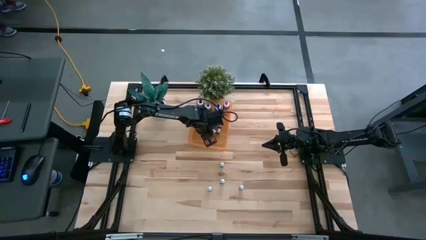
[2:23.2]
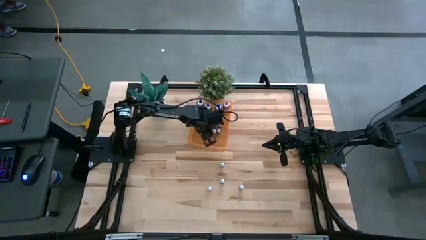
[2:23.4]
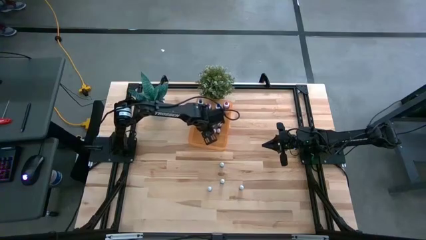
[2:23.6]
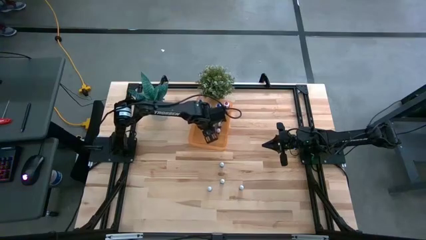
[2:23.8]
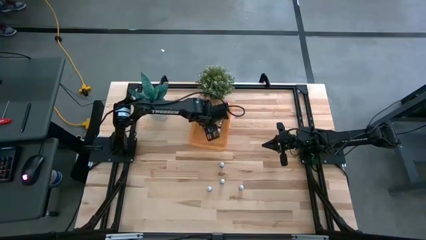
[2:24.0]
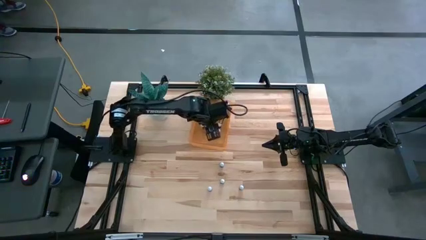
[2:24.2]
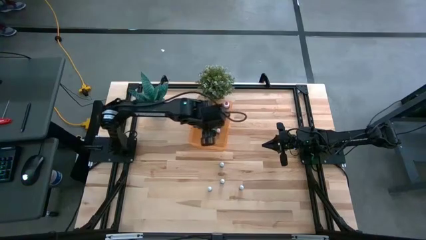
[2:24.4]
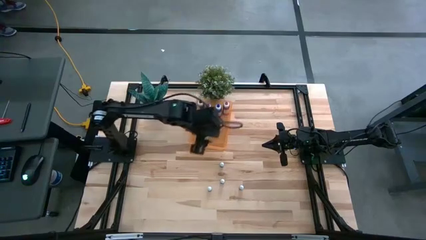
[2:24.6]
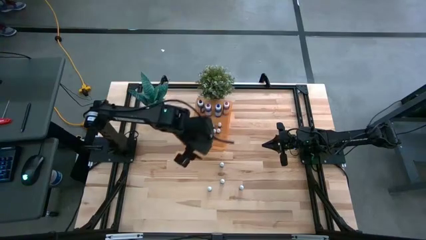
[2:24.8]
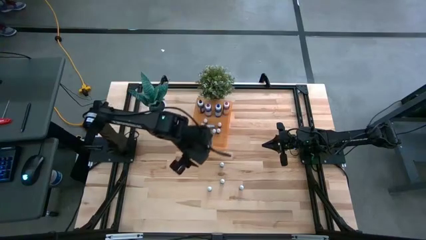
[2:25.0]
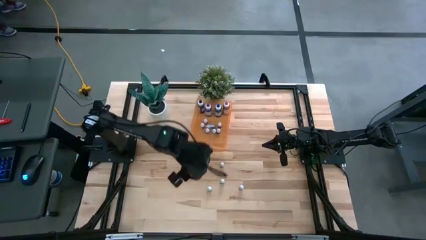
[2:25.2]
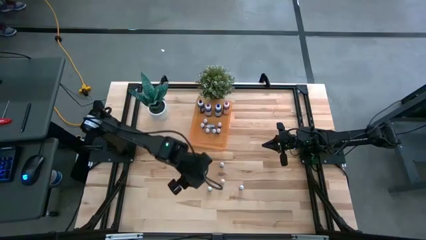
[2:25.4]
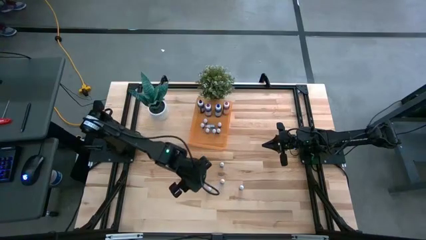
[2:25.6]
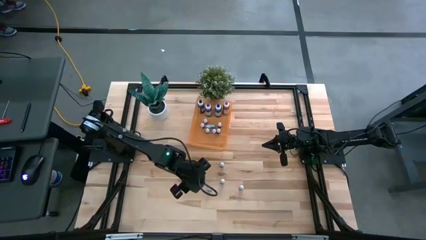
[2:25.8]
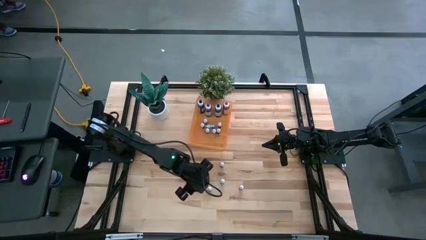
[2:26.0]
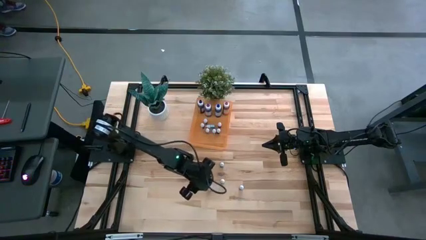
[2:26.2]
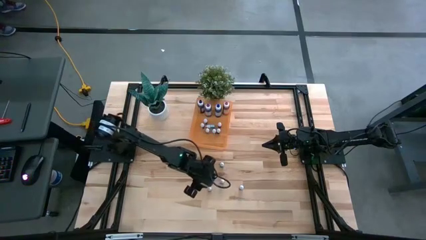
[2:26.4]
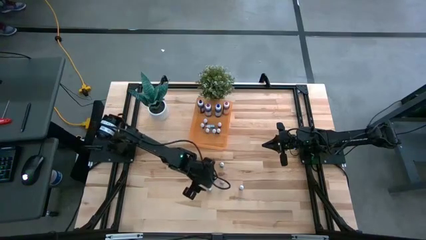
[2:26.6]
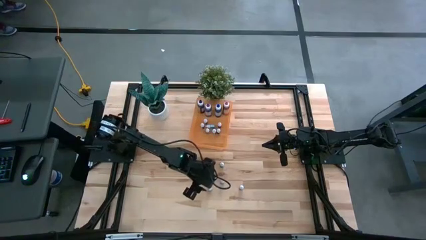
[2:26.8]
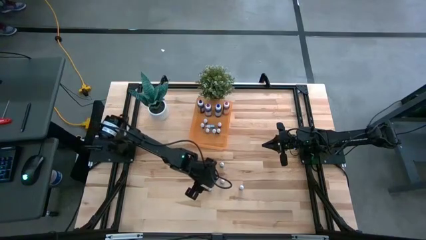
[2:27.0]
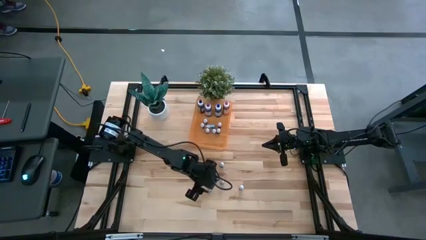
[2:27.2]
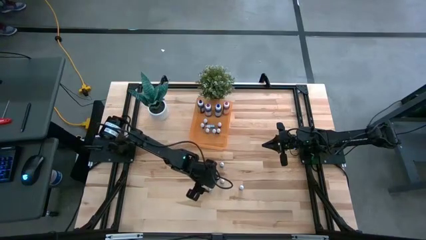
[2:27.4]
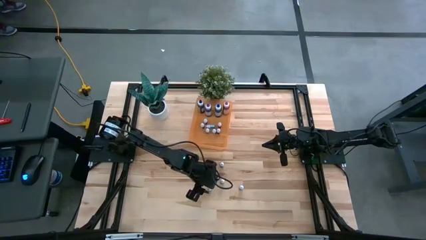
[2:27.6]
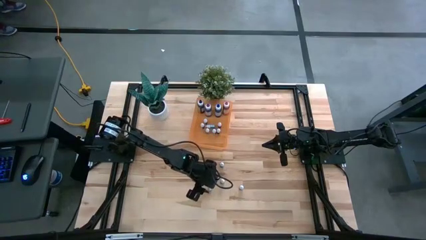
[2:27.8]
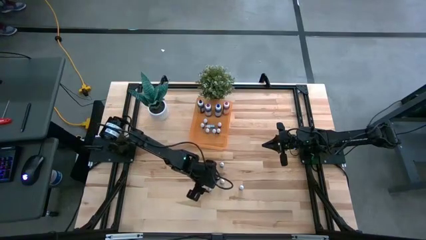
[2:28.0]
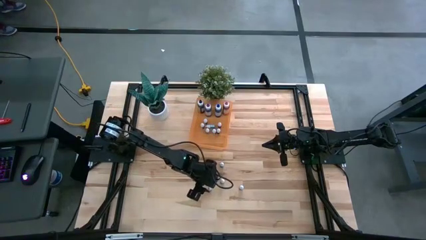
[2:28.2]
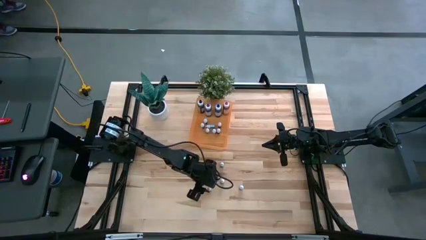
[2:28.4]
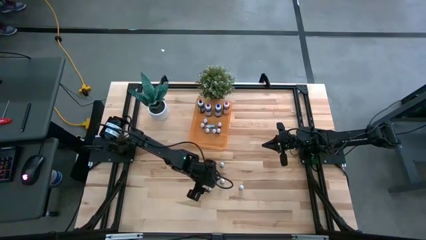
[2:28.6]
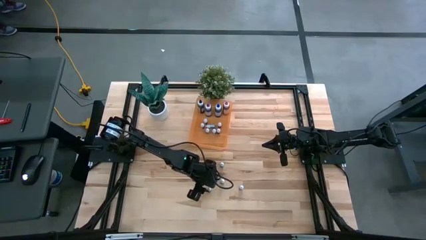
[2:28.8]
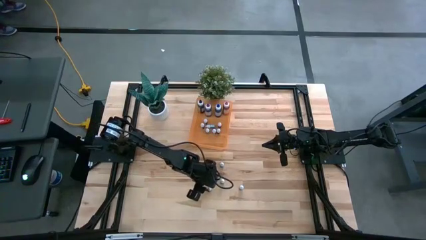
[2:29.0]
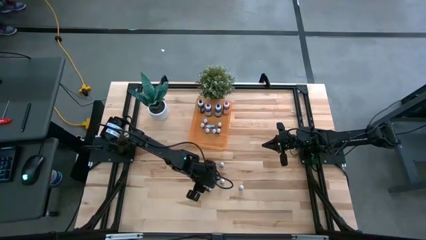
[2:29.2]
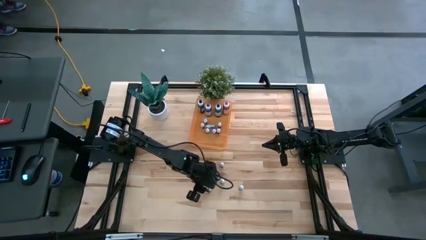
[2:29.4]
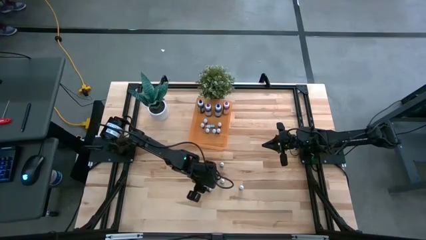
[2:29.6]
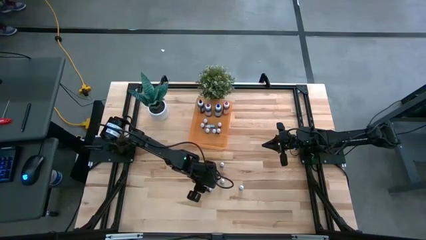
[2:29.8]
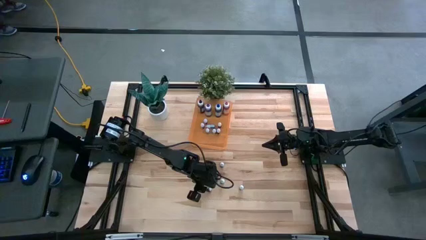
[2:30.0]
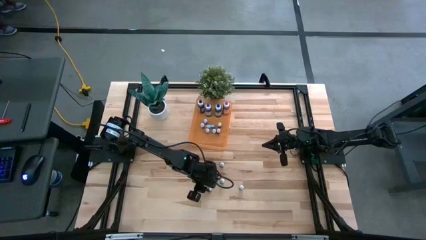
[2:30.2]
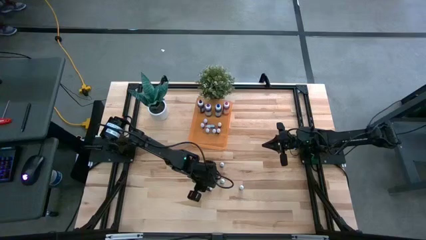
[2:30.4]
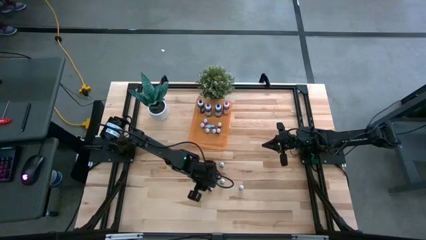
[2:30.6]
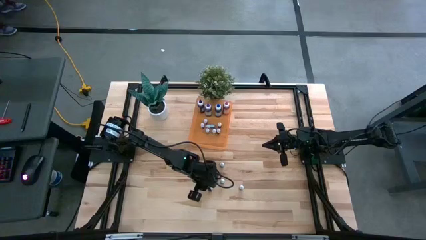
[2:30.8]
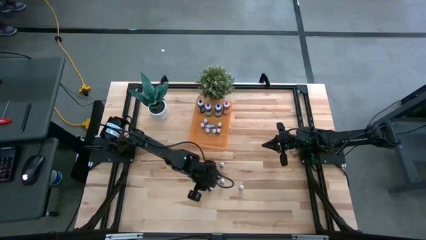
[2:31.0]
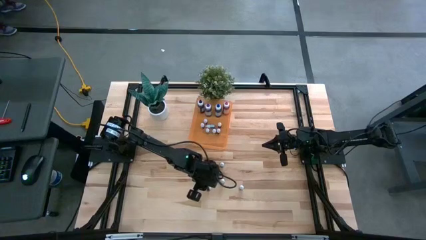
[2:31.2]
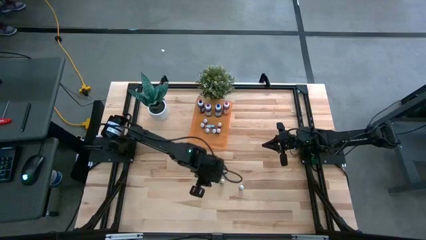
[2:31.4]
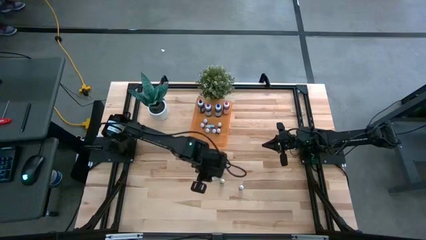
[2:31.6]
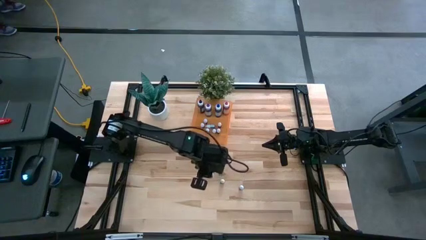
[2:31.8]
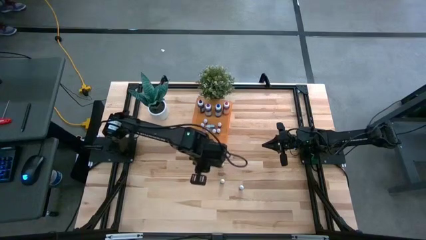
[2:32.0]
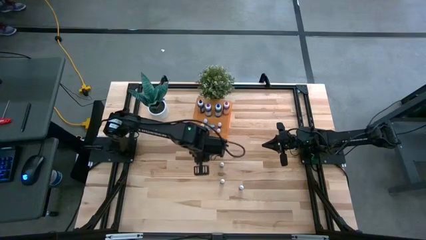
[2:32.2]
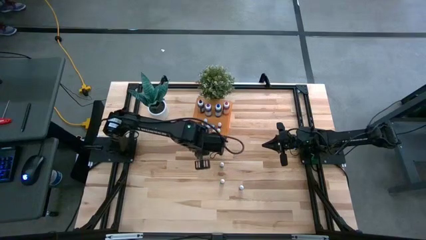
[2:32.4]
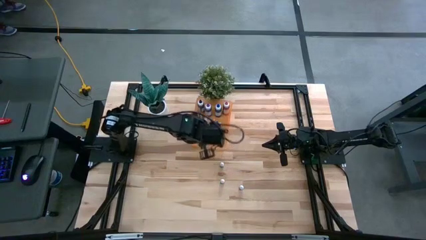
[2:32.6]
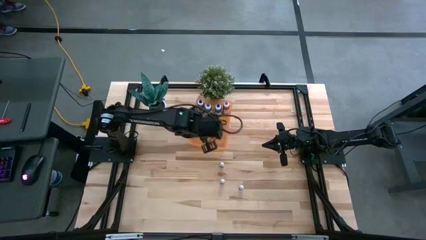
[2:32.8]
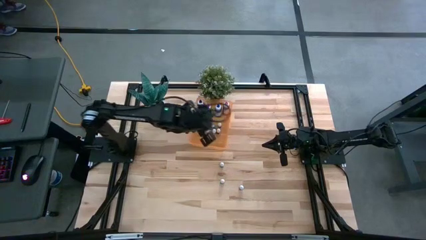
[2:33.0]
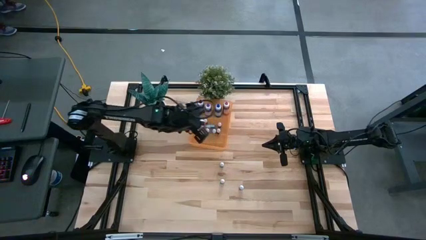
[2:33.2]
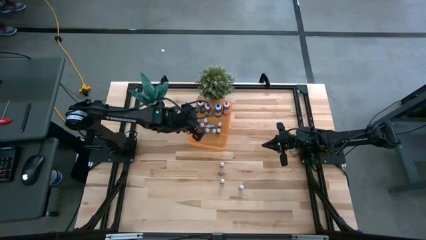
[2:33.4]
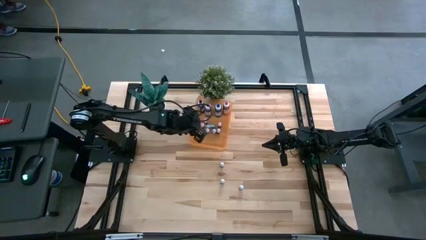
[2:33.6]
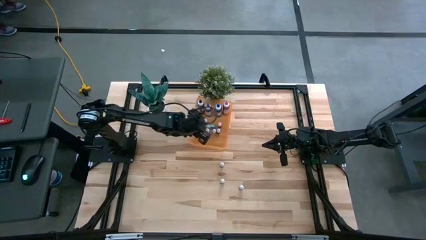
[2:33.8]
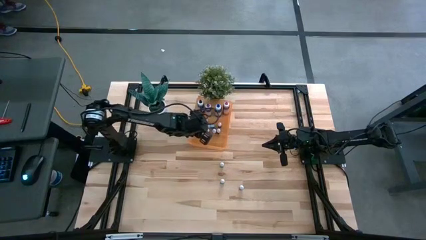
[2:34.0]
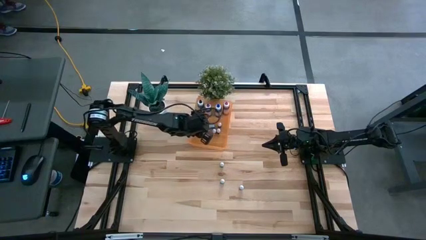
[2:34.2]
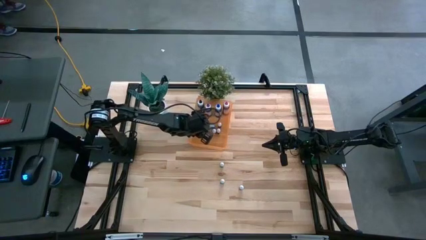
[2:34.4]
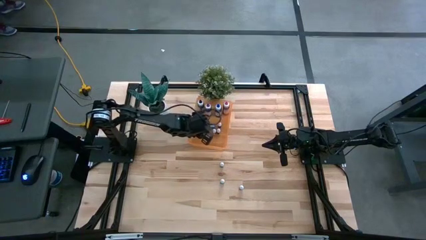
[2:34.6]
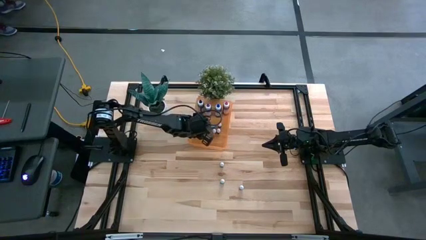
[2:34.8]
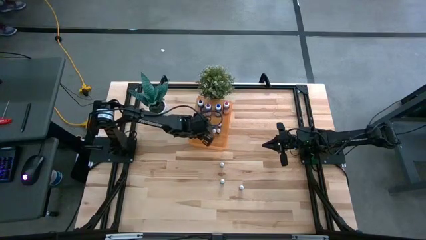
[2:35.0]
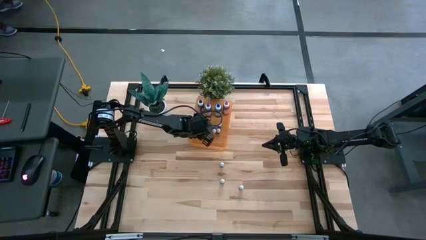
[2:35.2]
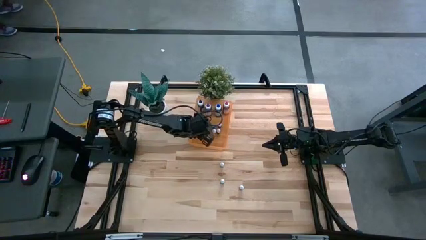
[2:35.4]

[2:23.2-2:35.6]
Task: Pick & Place food coloring
Put the left small red food coloring bottle into the orange bin
